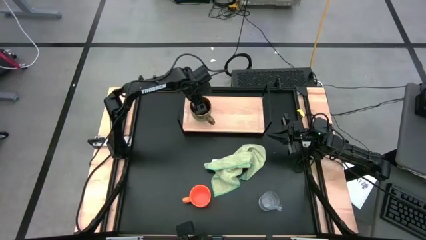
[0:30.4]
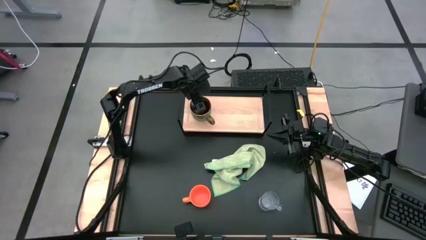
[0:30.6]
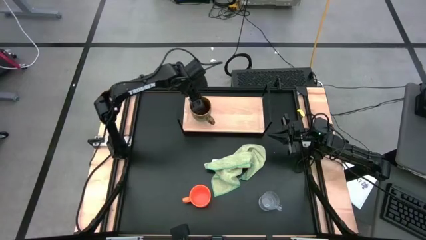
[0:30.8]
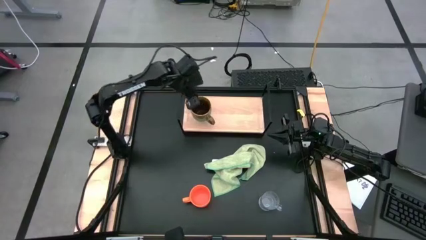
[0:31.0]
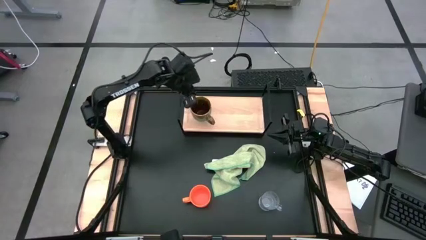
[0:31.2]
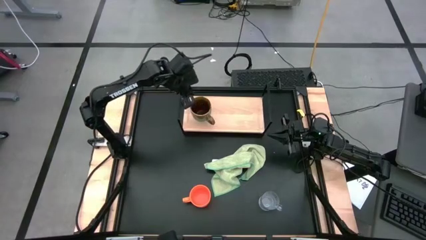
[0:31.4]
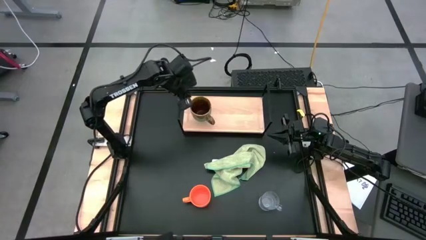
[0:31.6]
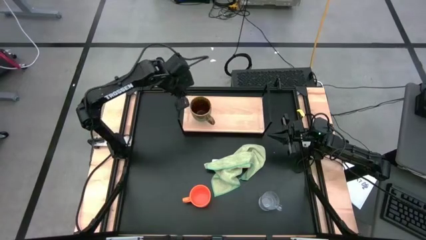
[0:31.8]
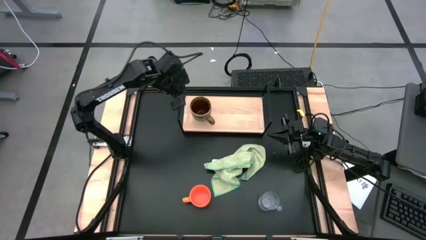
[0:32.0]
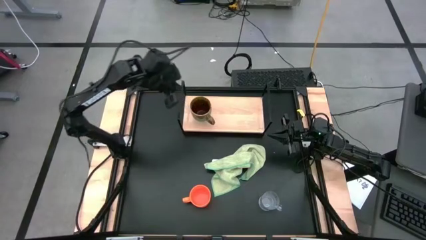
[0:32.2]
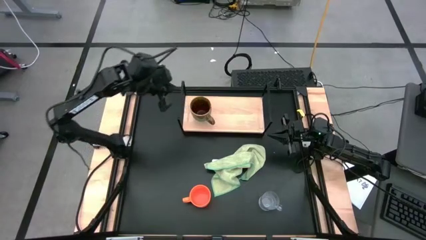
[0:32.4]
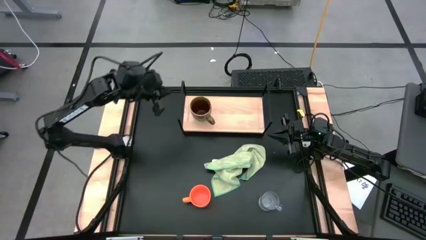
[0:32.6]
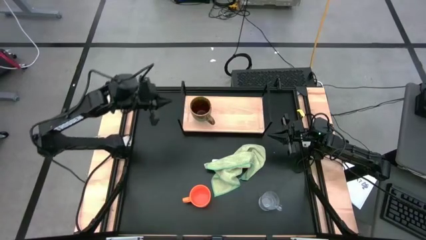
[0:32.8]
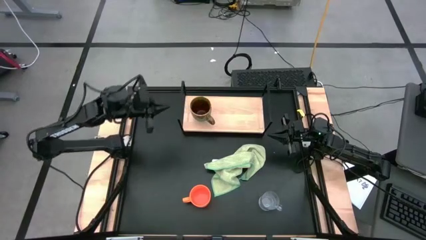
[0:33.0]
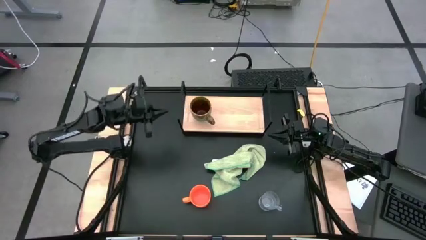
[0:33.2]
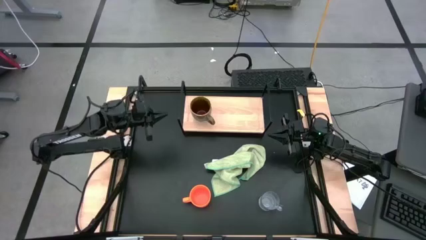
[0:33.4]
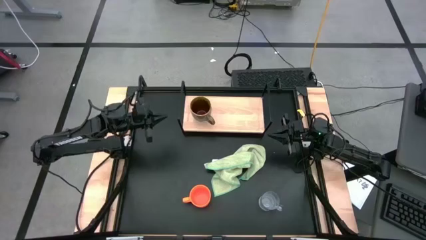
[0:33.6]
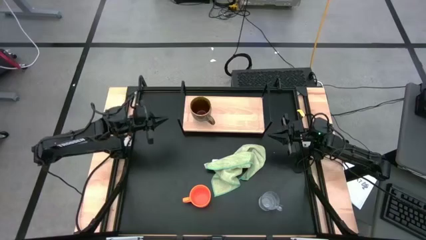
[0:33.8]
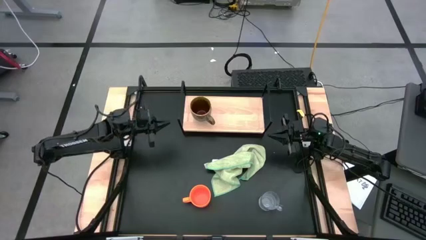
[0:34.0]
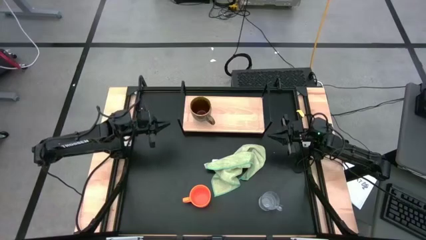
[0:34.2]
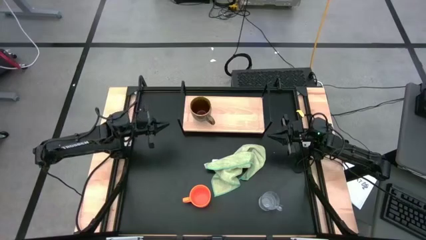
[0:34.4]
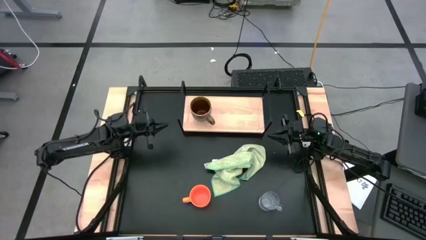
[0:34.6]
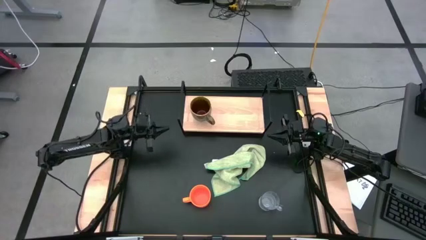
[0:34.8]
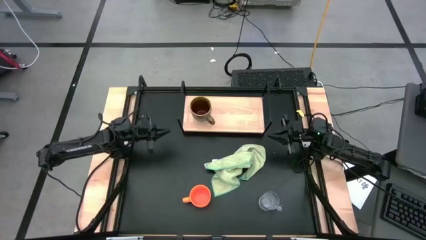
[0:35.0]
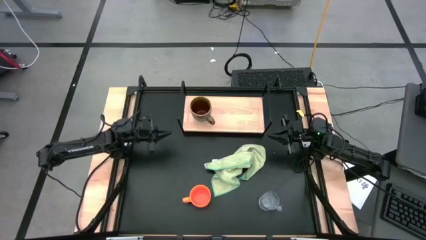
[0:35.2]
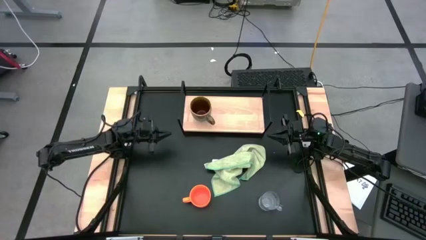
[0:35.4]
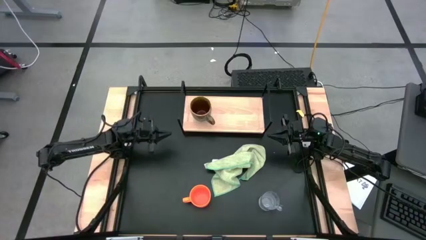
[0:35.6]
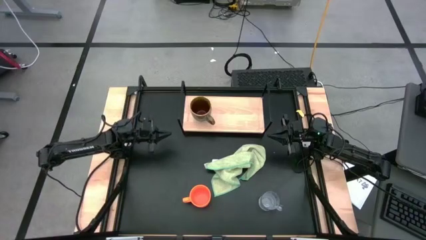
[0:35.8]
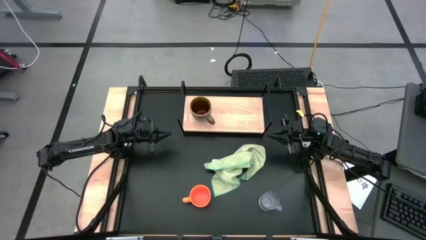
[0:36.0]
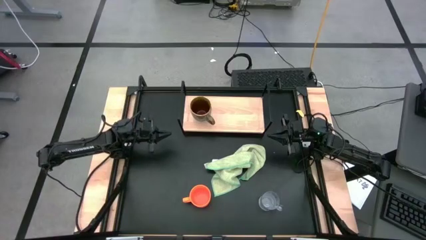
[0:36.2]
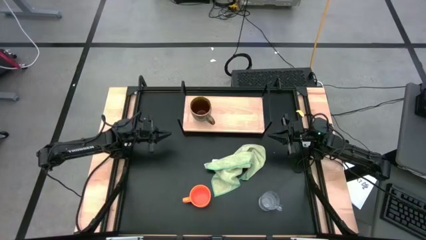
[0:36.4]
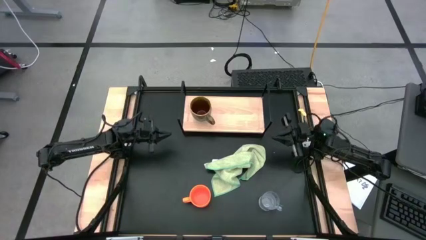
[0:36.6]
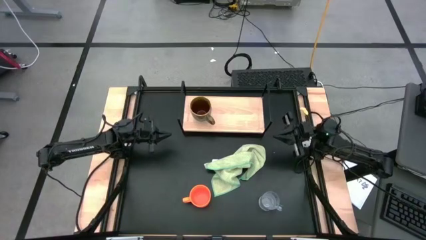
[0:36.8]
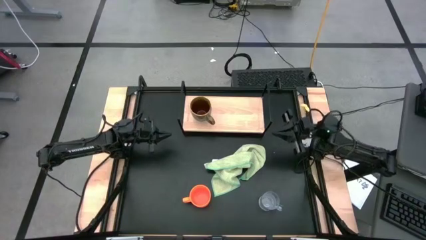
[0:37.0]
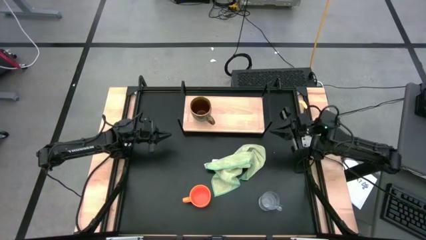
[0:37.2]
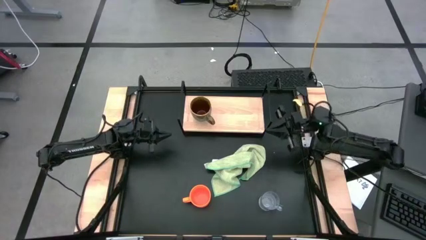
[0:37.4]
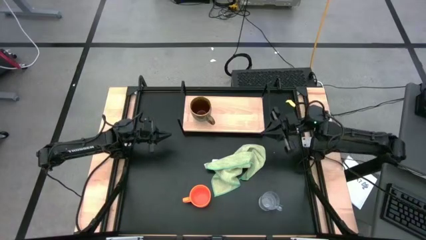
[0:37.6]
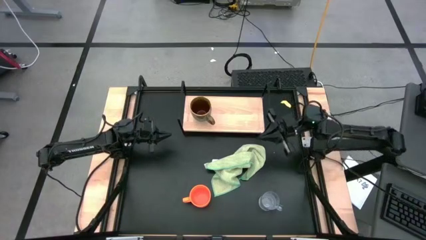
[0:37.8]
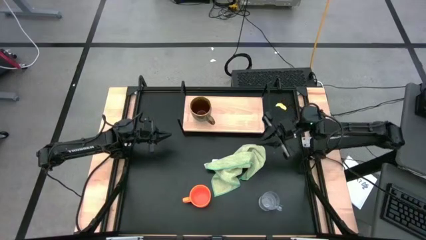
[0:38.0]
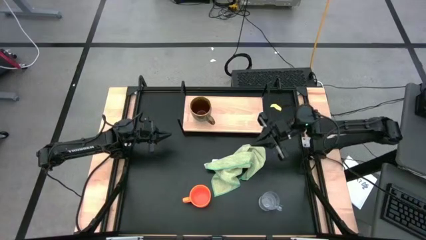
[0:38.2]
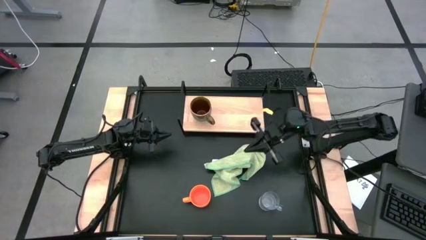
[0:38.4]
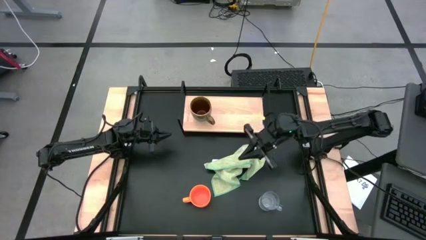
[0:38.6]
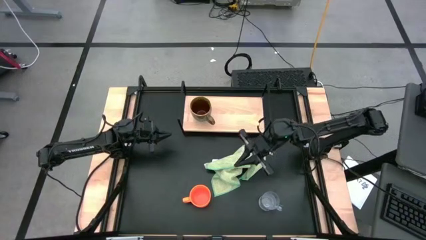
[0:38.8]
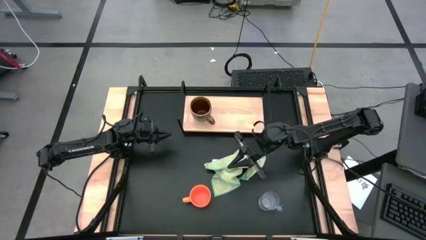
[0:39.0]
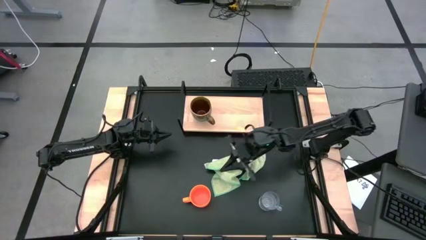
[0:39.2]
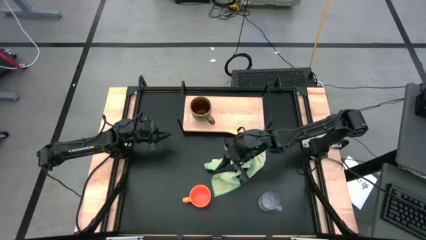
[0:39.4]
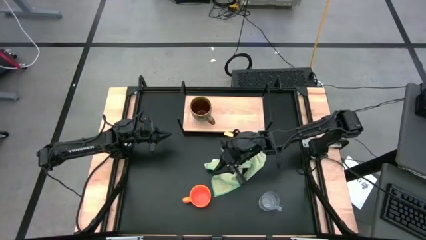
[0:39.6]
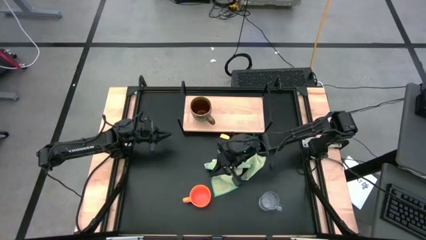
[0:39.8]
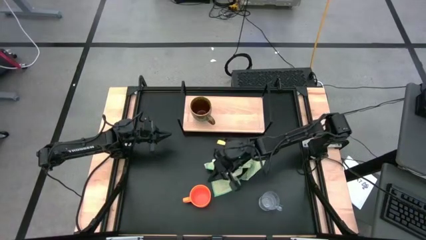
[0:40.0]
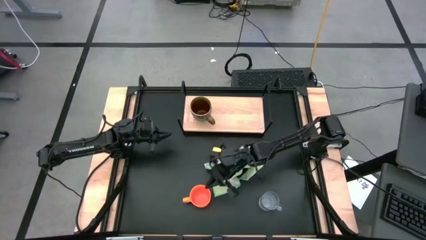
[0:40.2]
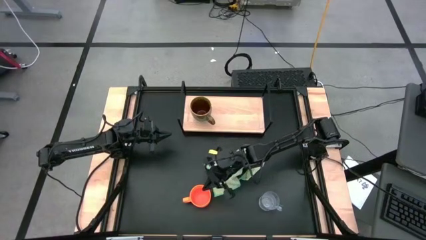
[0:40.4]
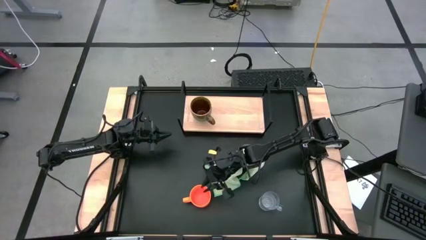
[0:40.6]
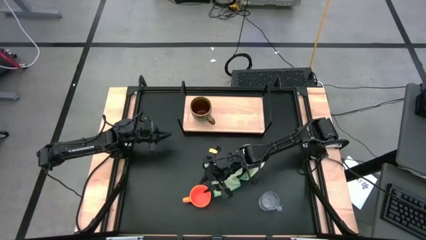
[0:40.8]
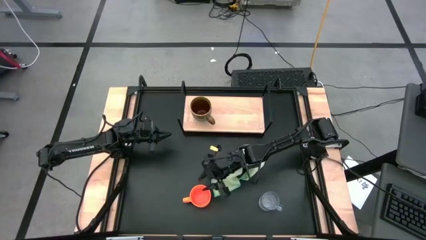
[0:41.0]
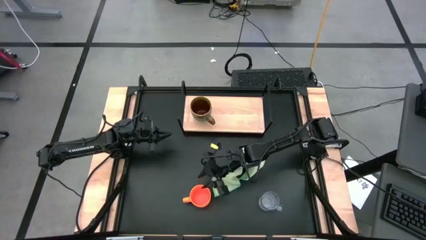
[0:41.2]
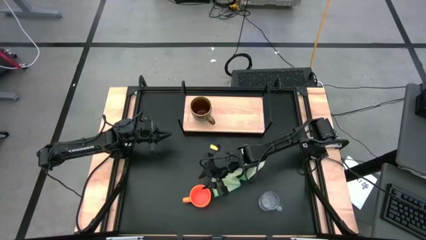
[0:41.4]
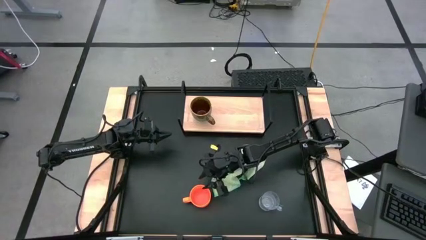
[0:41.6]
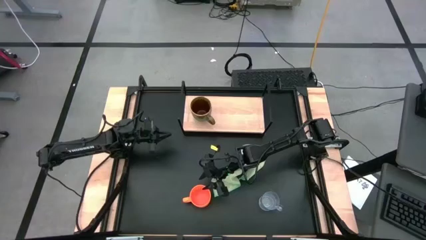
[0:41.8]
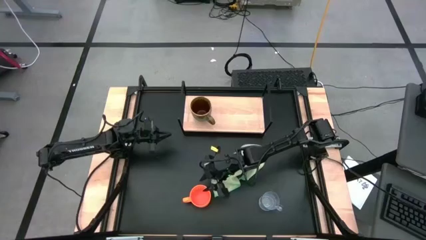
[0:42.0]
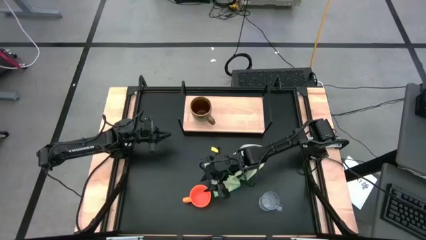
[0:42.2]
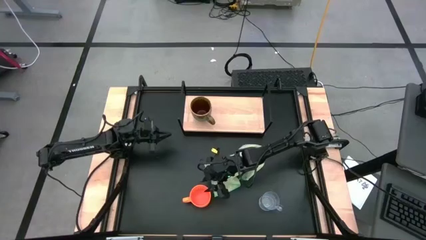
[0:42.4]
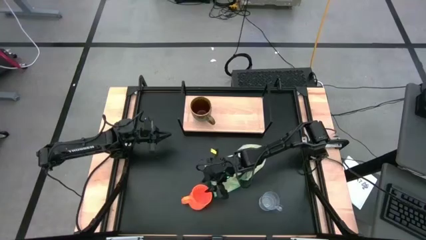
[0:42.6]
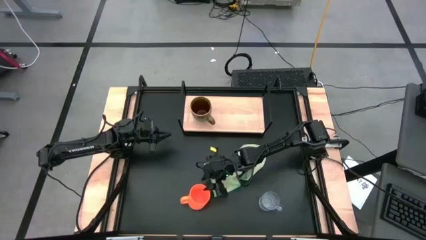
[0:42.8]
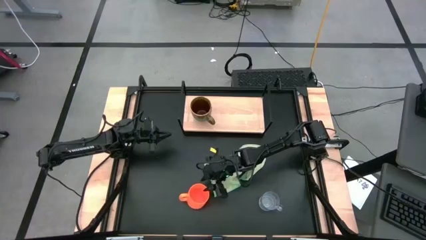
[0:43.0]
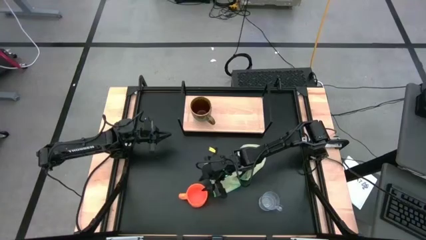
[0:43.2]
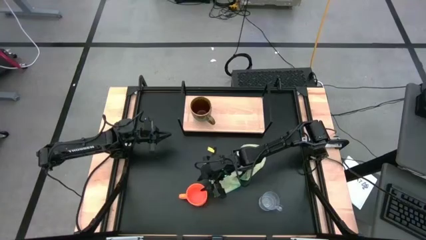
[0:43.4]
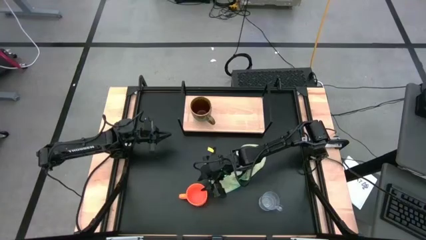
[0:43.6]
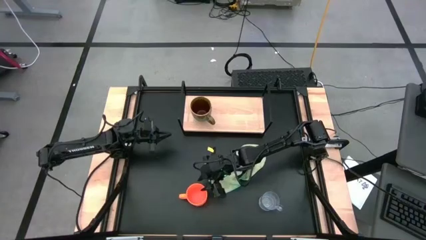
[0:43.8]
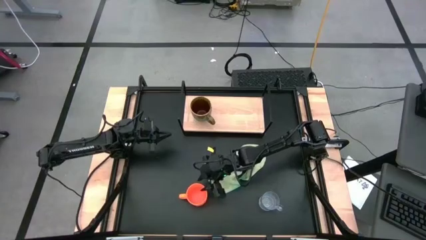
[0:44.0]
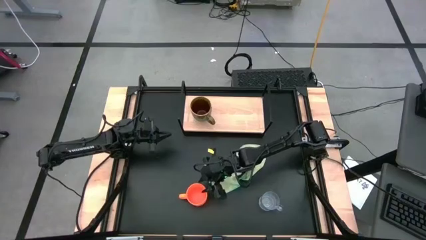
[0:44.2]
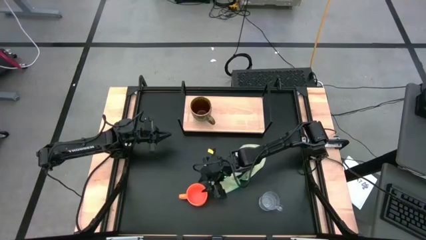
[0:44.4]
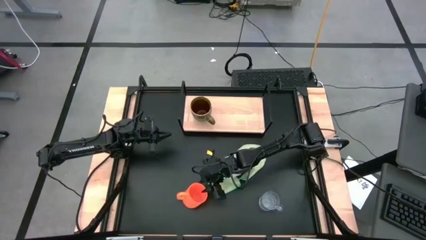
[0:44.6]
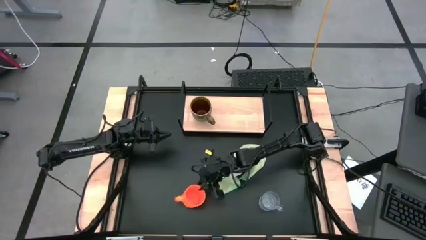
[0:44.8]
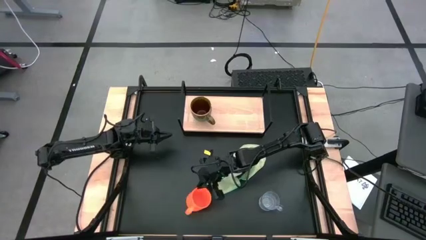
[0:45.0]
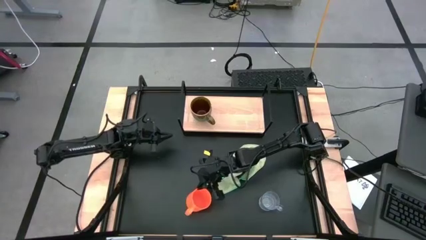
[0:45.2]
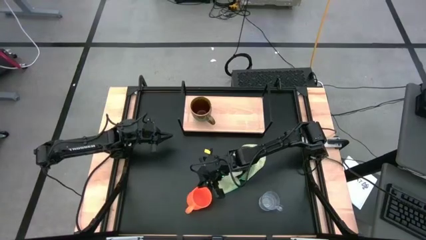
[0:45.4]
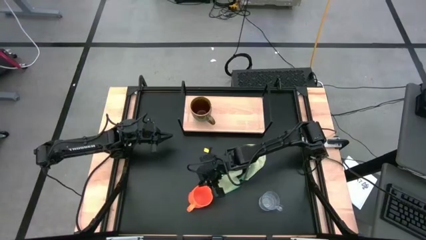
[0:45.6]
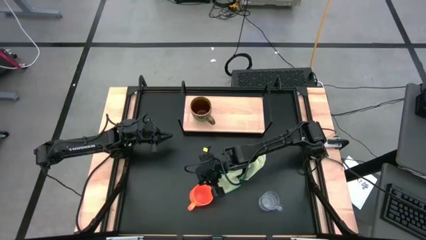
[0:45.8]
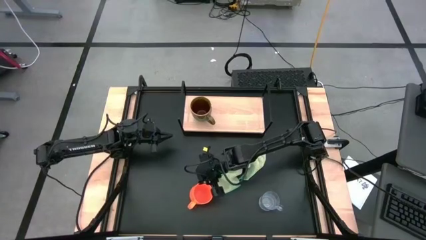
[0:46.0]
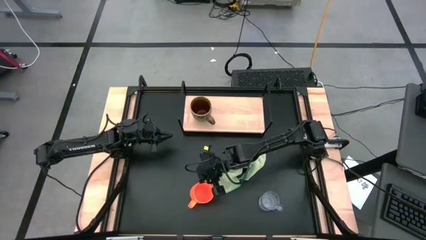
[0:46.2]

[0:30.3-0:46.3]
Task: Stack small to large cups/mugs on shelf
Put the orange mug on the shelf
